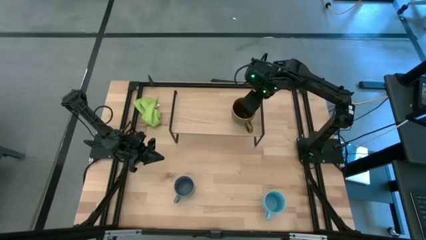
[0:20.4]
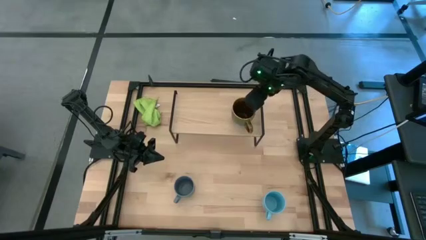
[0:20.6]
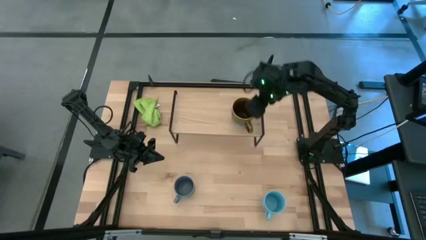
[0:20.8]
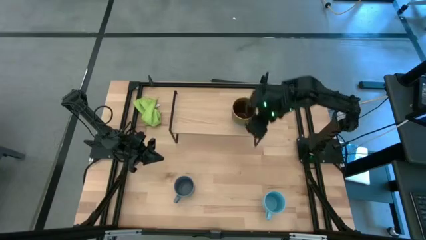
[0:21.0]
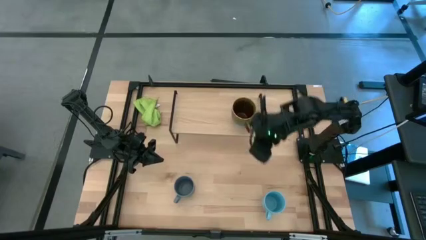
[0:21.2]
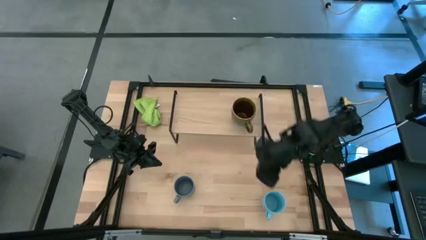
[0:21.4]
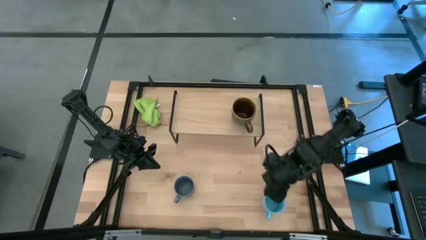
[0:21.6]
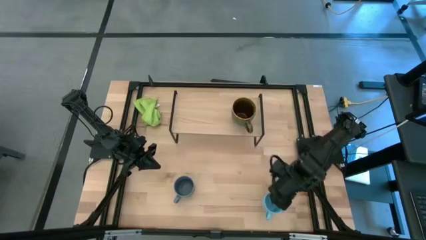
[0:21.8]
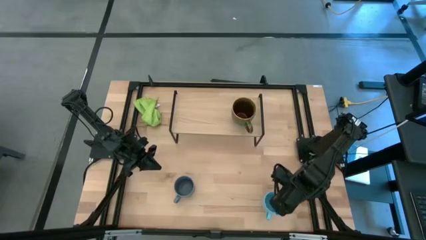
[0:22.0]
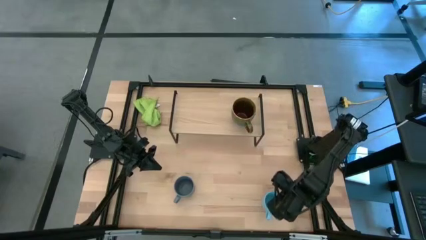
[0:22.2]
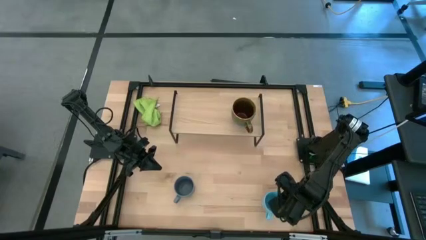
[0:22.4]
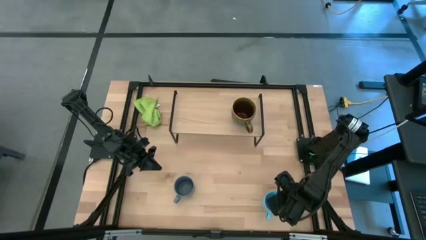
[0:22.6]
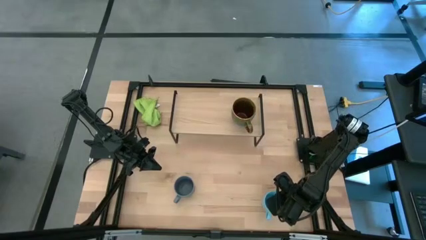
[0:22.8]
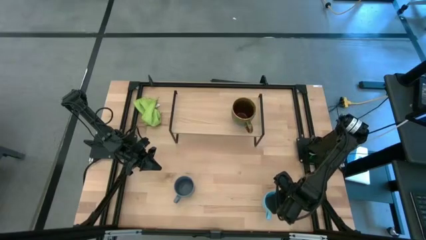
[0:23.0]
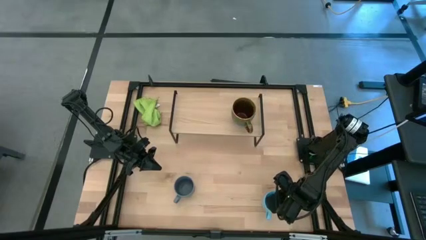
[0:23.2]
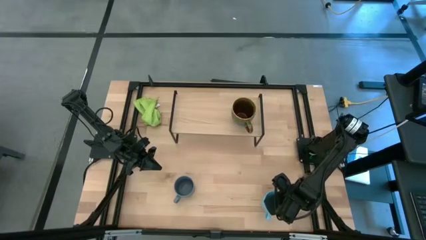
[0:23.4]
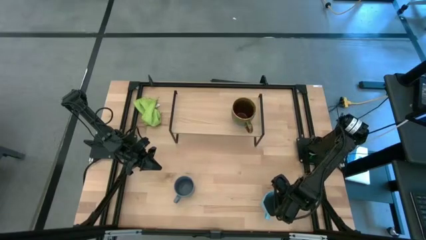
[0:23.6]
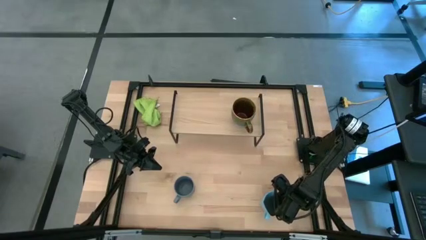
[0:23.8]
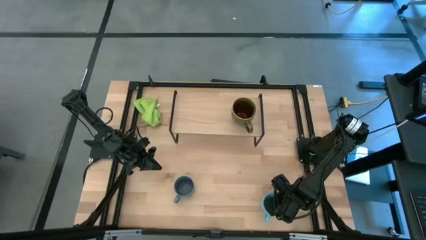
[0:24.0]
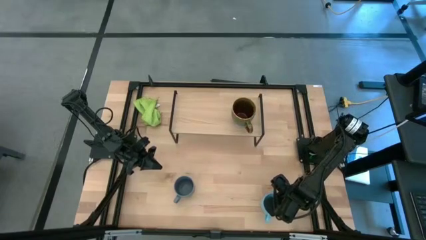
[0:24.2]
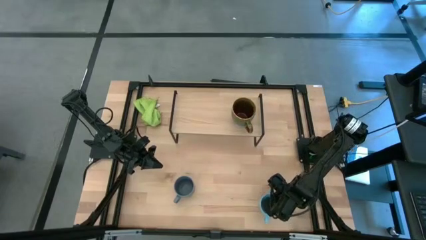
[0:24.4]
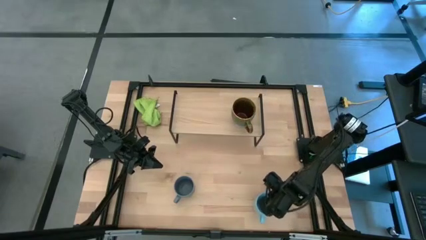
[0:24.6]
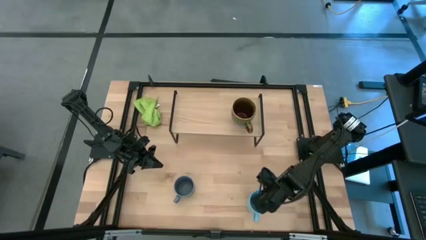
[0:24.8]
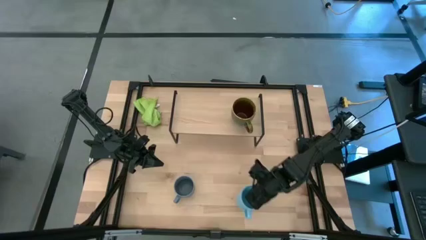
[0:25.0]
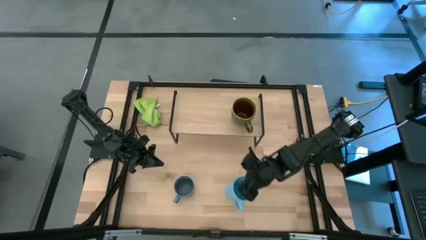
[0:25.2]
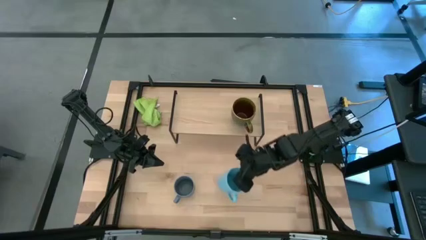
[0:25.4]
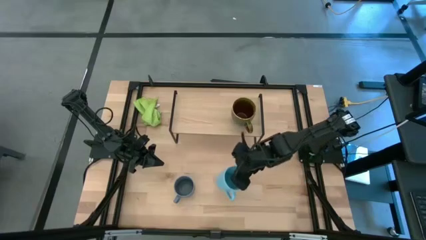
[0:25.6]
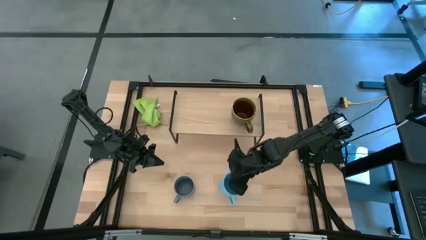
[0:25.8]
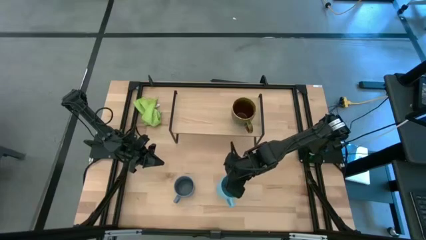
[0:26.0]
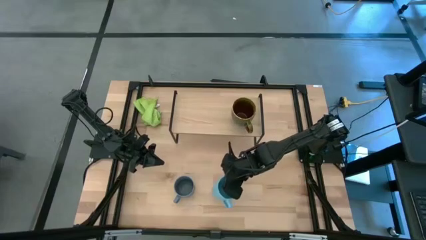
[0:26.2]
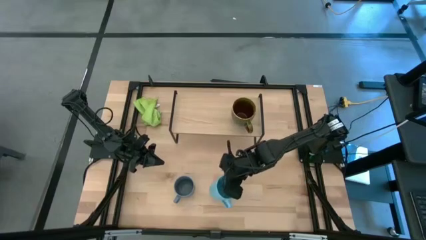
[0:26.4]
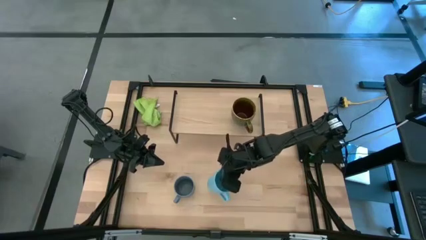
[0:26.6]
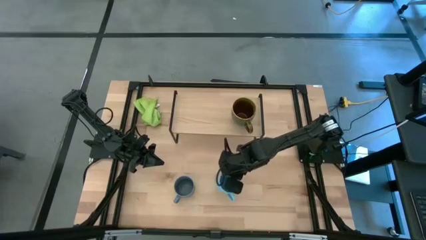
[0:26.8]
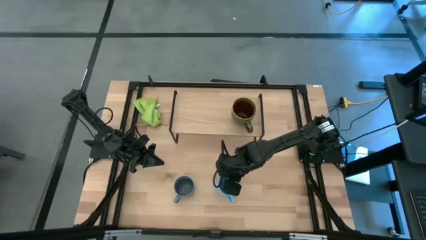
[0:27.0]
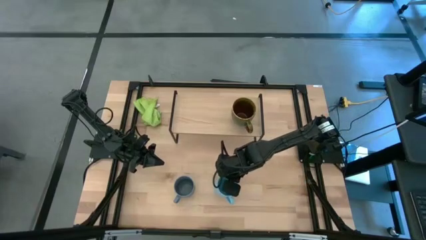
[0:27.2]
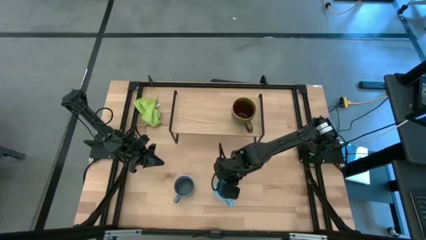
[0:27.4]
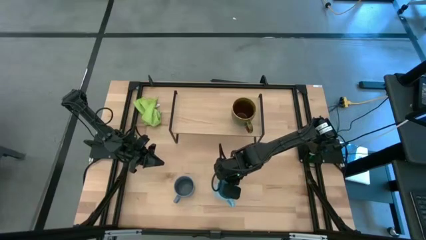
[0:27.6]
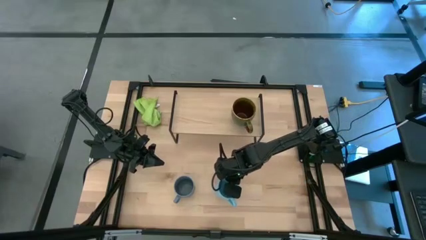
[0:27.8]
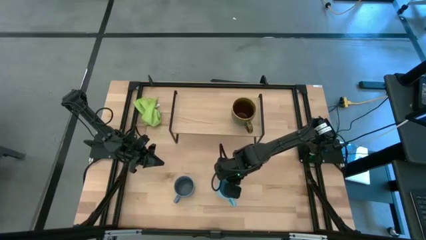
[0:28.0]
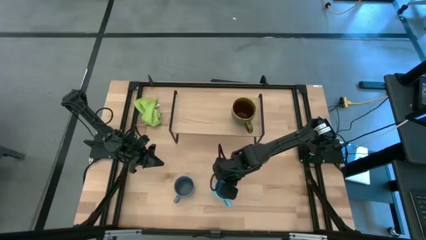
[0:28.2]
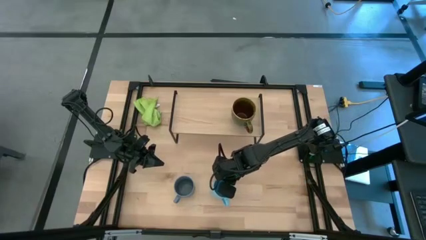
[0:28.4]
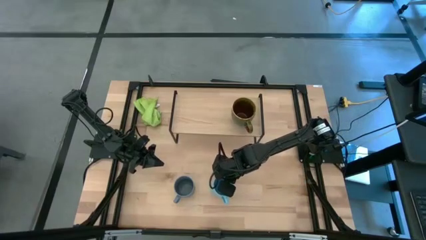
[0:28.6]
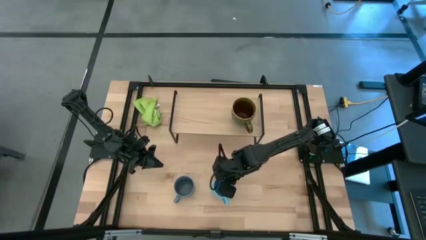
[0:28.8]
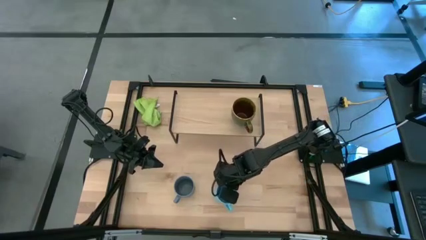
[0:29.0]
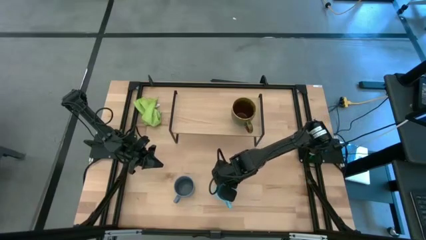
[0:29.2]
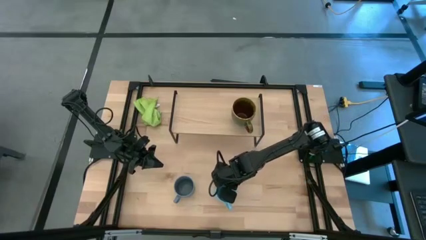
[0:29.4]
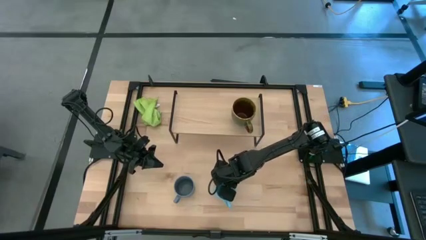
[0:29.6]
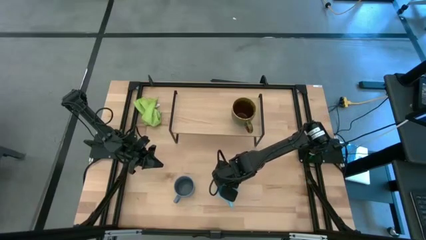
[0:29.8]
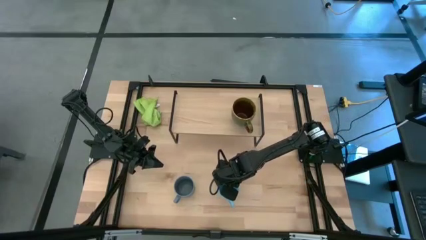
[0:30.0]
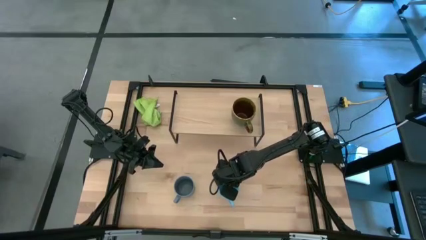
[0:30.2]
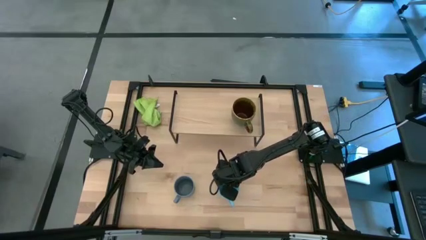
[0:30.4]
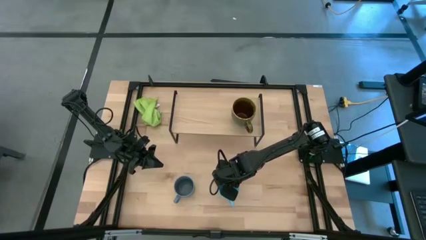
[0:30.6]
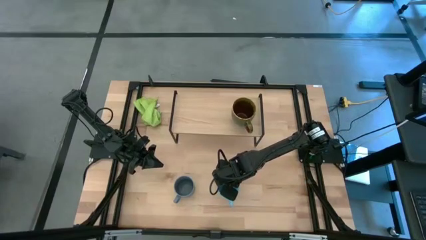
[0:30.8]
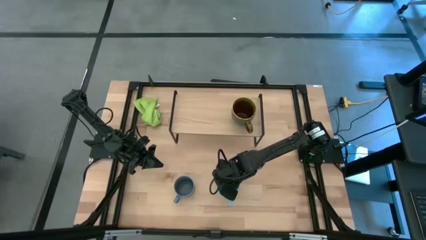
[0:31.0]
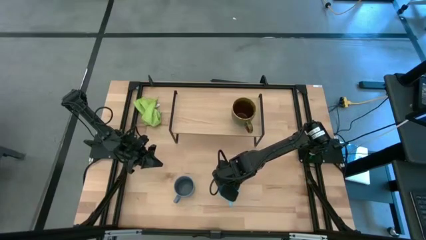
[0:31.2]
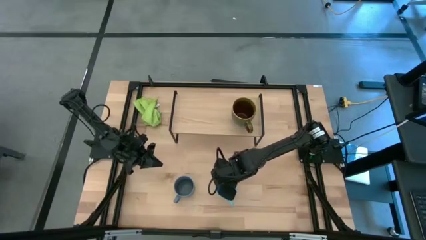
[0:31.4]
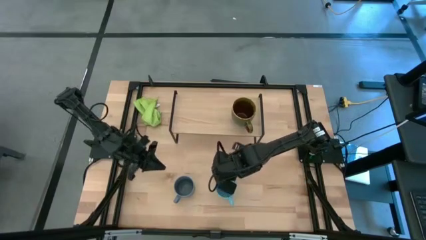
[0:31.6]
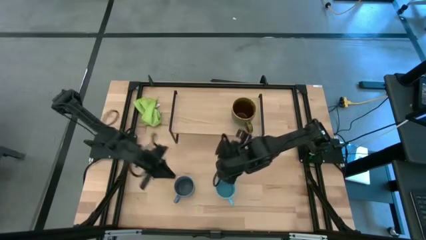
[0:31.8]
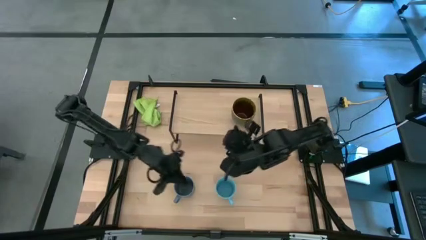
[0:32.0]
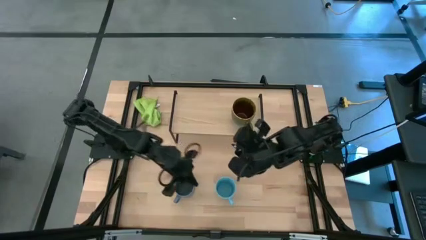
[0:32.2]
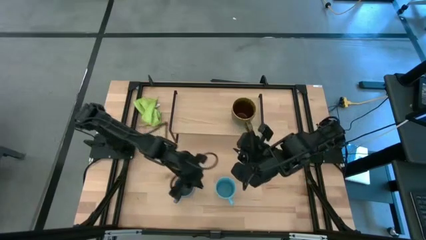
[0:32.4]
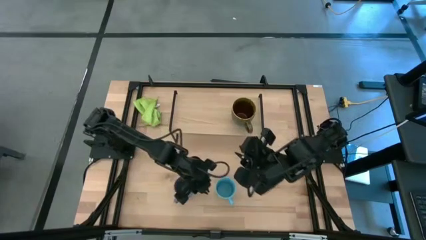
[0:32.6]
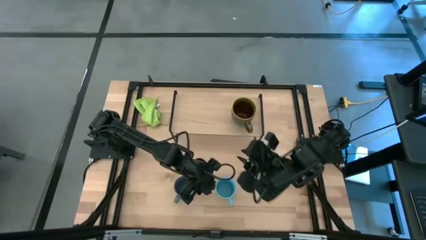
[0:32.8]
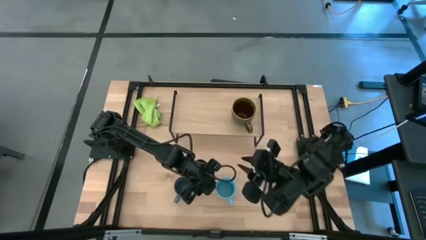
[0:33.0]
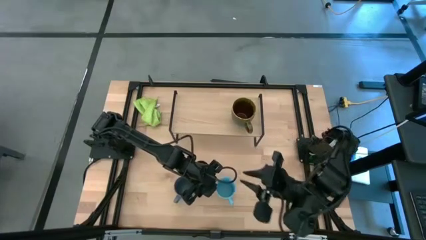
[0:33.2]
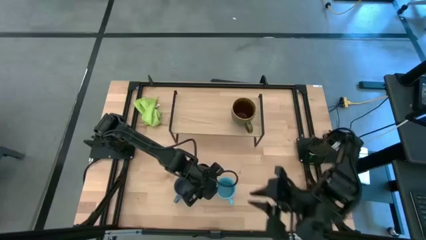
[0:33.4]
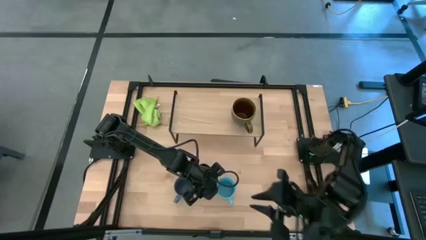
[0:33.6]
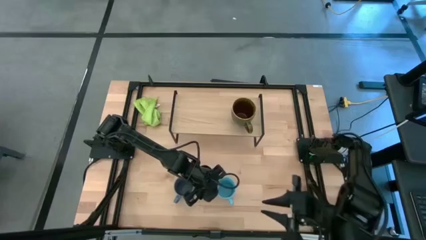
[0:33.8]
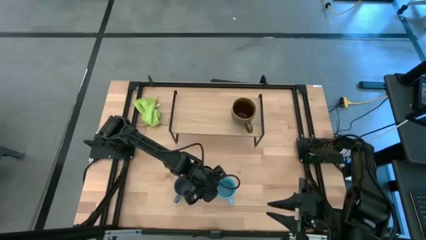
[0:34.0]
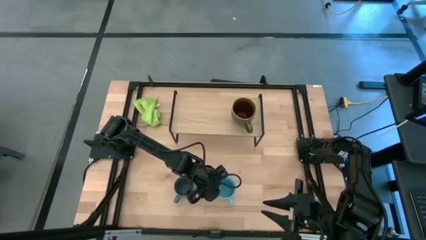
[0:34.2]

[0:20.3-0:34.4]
Task: Stack small to large cups/mugs on shelf
Put the blue mug on the shelf
